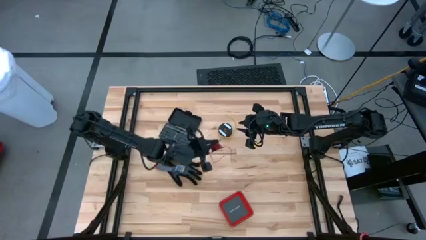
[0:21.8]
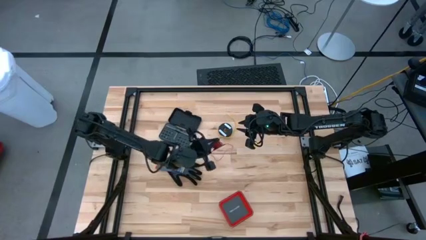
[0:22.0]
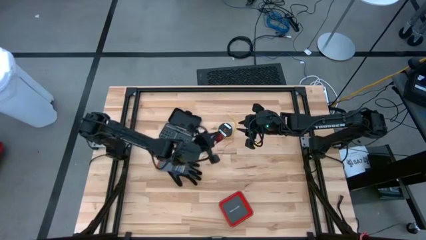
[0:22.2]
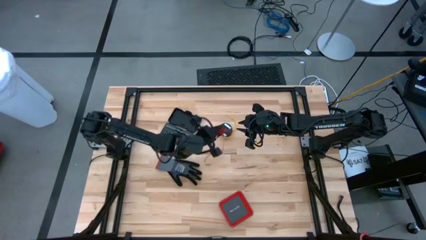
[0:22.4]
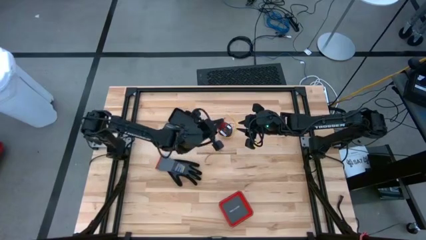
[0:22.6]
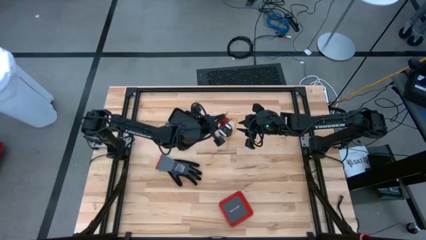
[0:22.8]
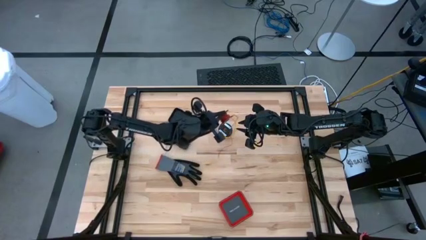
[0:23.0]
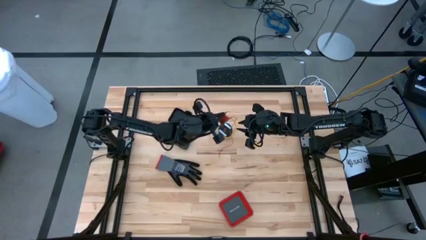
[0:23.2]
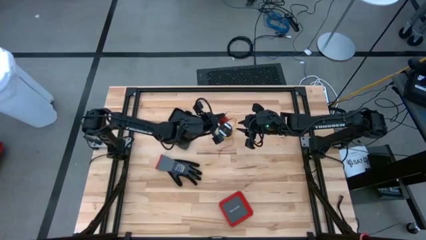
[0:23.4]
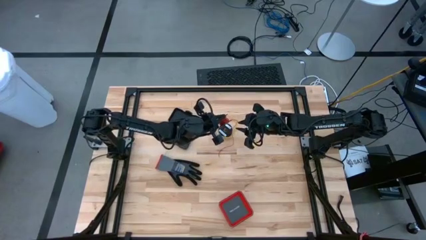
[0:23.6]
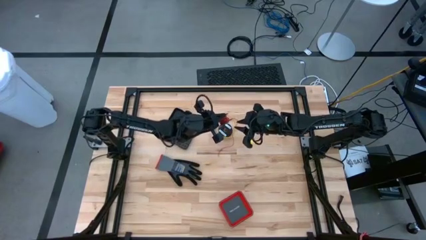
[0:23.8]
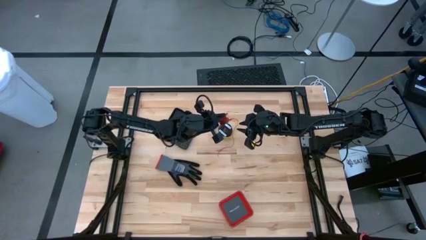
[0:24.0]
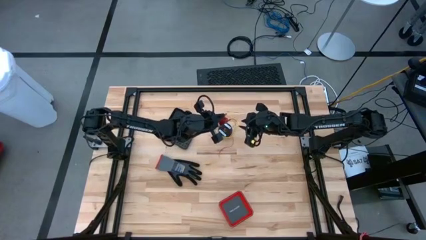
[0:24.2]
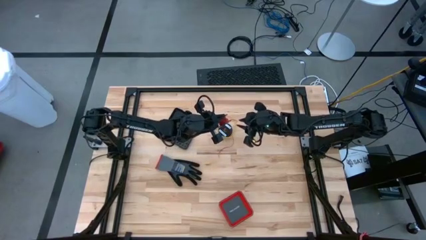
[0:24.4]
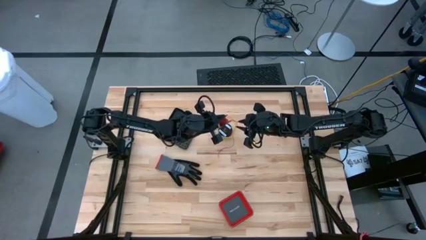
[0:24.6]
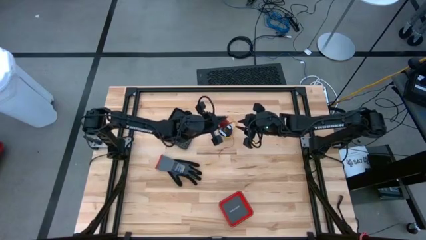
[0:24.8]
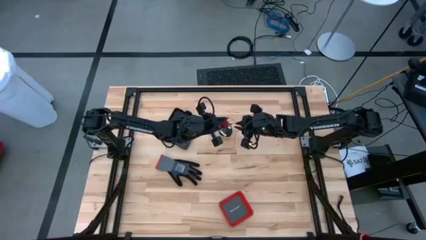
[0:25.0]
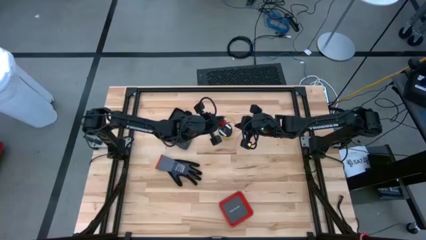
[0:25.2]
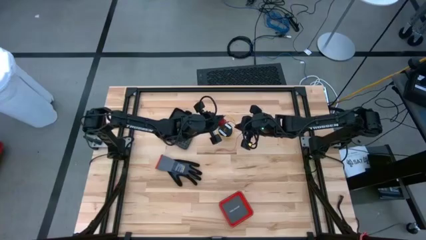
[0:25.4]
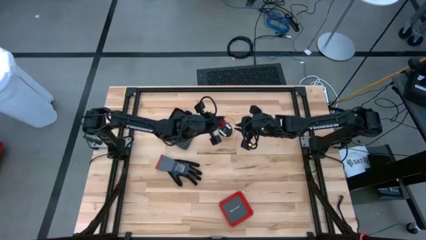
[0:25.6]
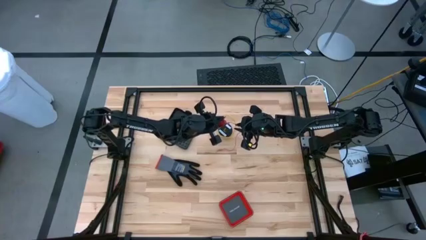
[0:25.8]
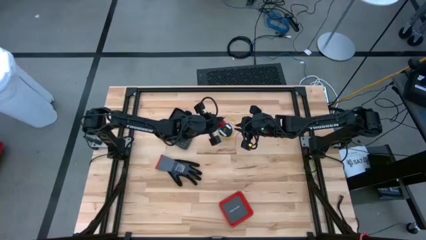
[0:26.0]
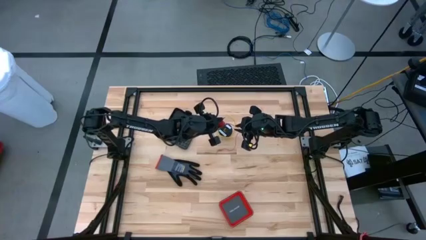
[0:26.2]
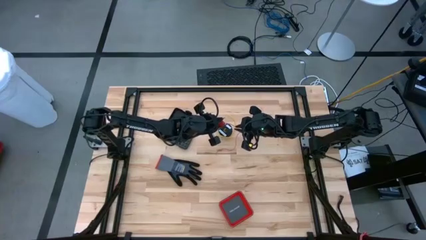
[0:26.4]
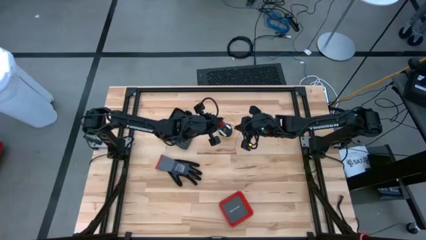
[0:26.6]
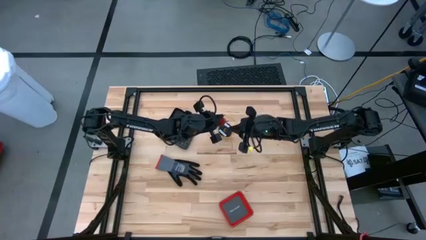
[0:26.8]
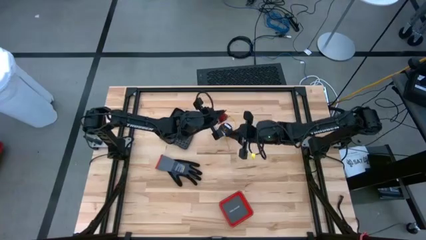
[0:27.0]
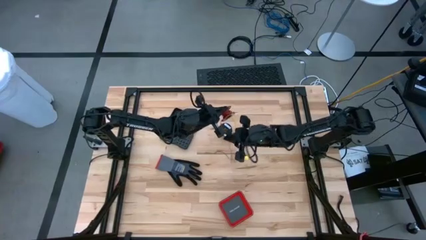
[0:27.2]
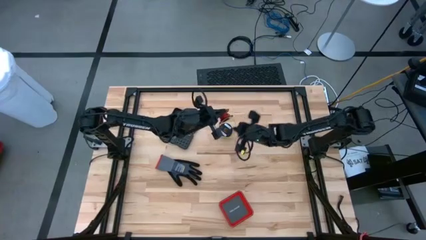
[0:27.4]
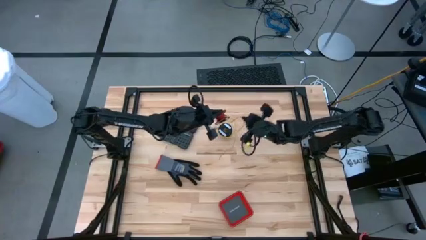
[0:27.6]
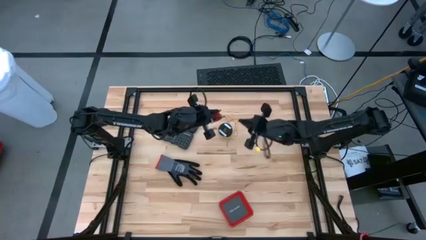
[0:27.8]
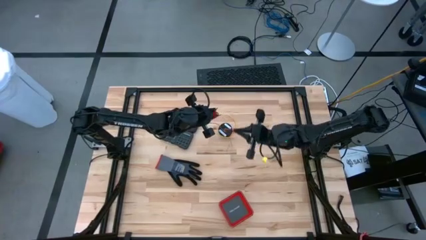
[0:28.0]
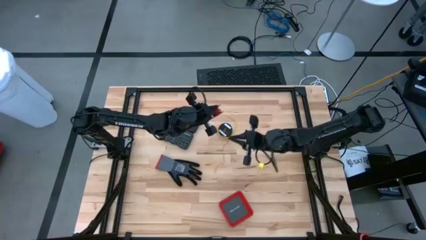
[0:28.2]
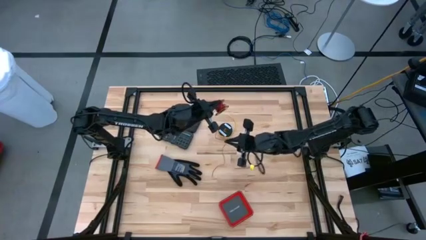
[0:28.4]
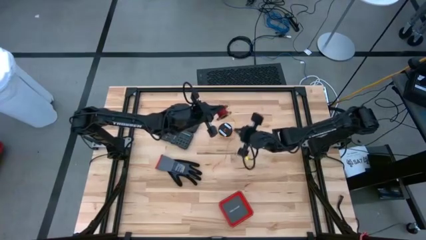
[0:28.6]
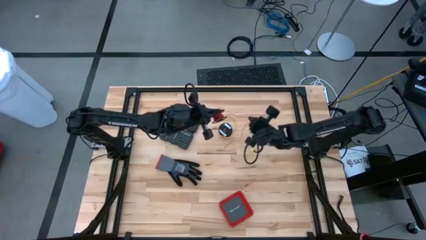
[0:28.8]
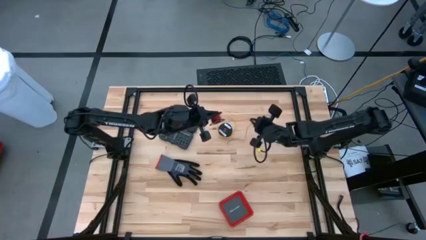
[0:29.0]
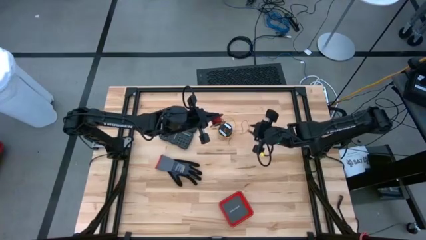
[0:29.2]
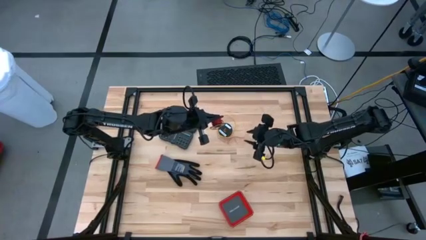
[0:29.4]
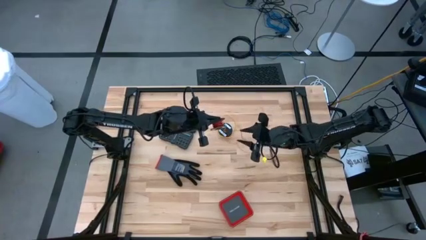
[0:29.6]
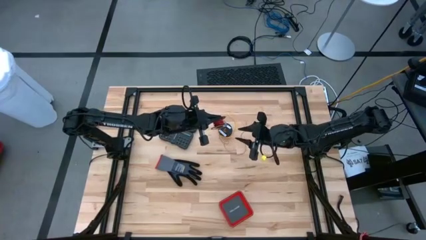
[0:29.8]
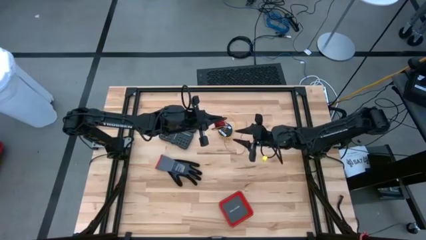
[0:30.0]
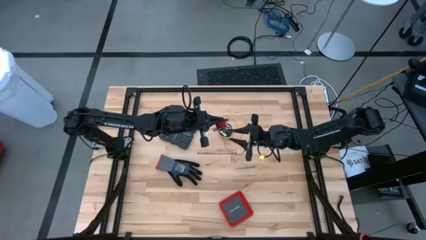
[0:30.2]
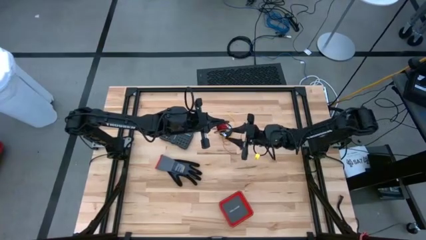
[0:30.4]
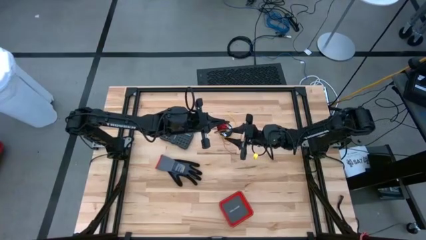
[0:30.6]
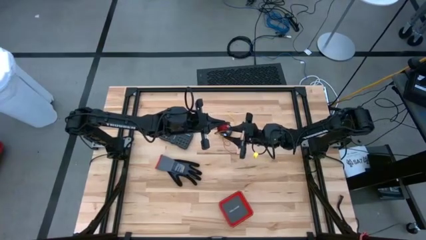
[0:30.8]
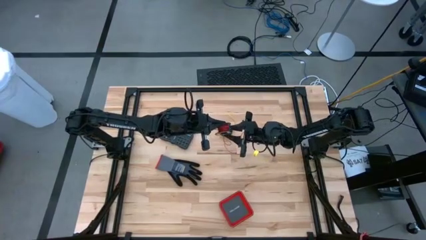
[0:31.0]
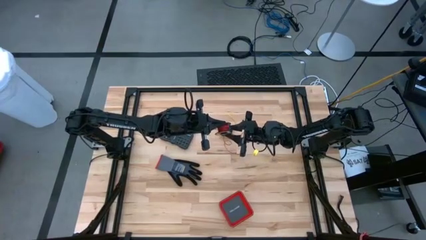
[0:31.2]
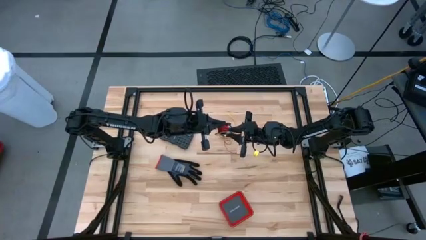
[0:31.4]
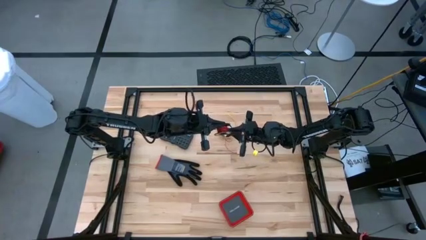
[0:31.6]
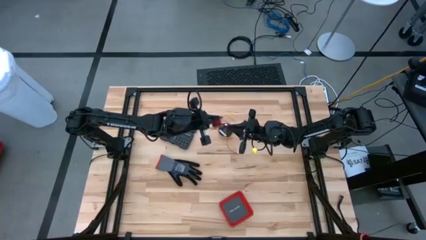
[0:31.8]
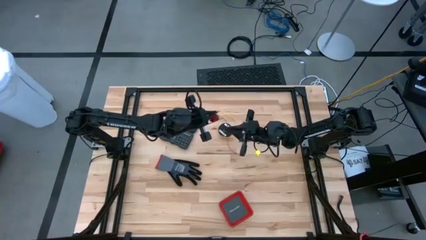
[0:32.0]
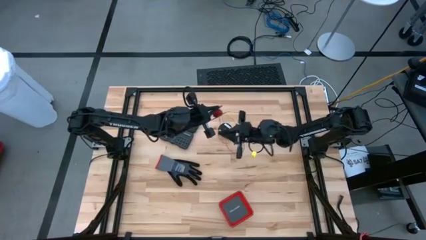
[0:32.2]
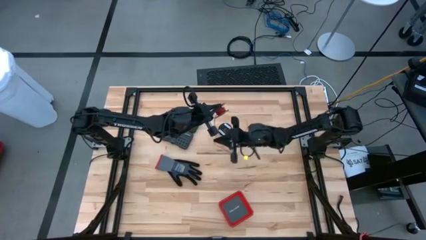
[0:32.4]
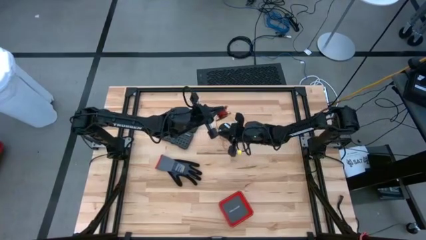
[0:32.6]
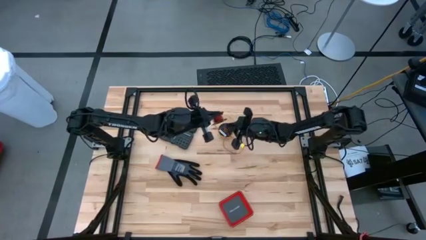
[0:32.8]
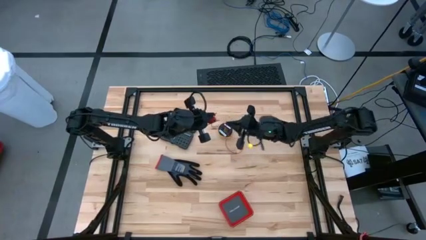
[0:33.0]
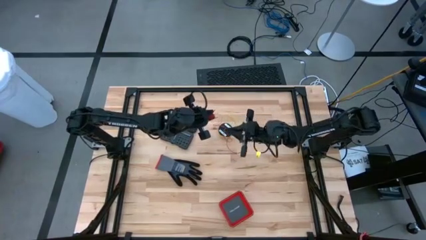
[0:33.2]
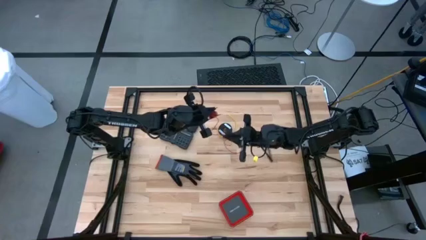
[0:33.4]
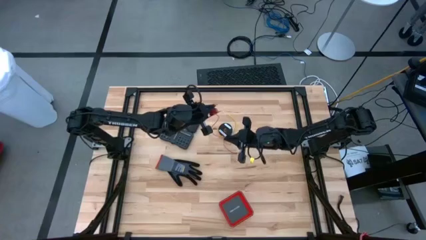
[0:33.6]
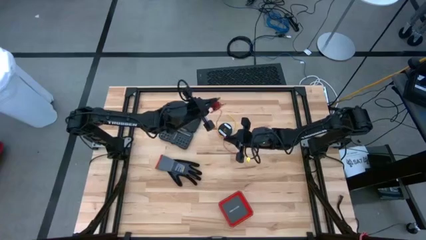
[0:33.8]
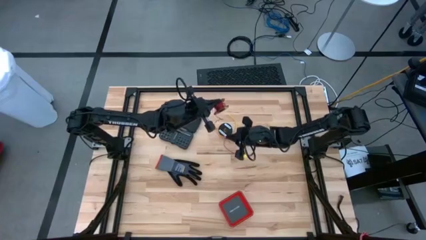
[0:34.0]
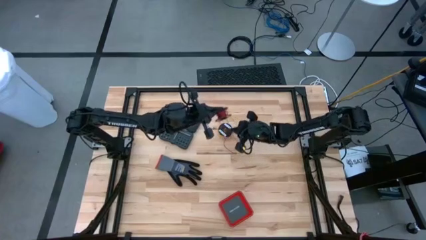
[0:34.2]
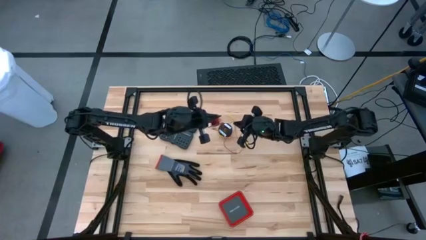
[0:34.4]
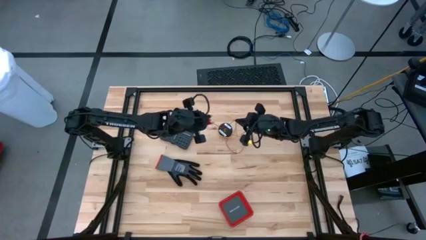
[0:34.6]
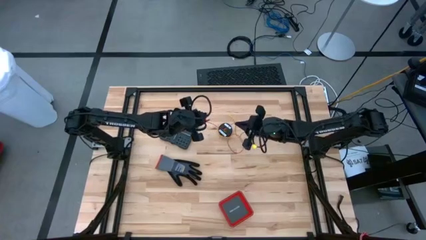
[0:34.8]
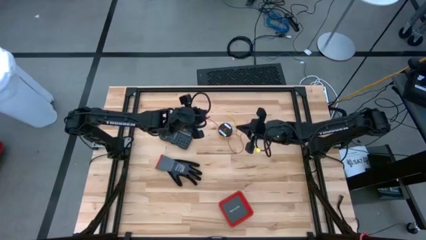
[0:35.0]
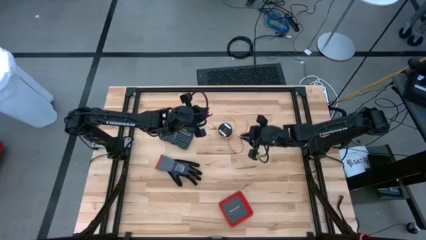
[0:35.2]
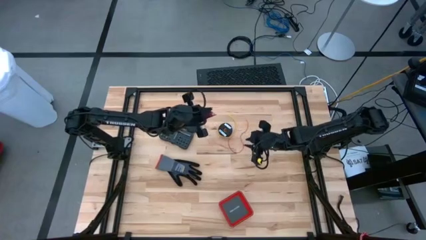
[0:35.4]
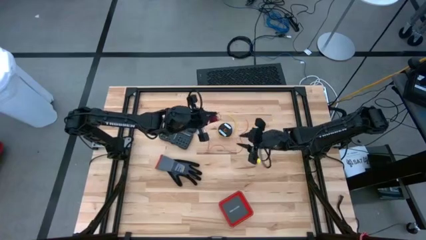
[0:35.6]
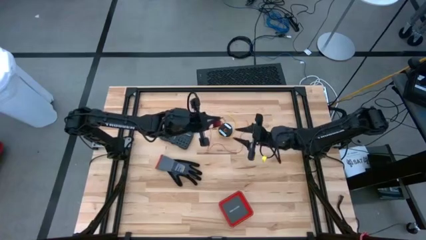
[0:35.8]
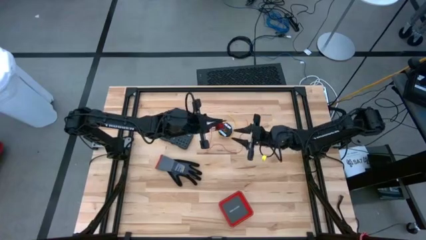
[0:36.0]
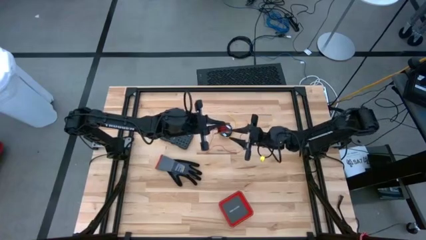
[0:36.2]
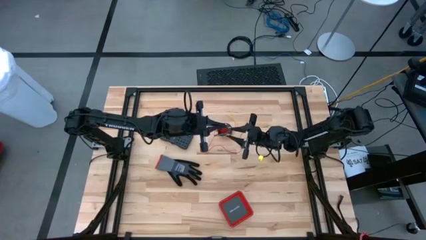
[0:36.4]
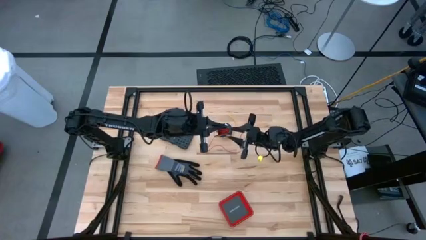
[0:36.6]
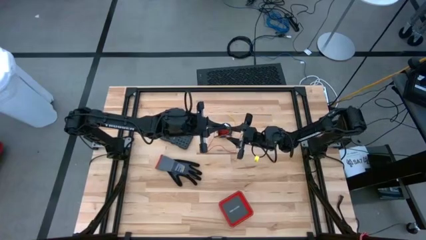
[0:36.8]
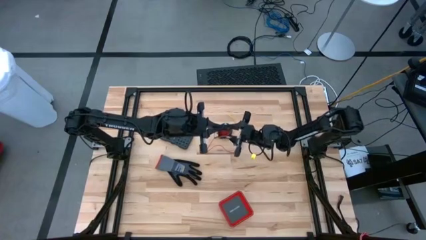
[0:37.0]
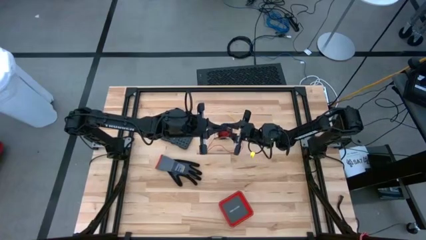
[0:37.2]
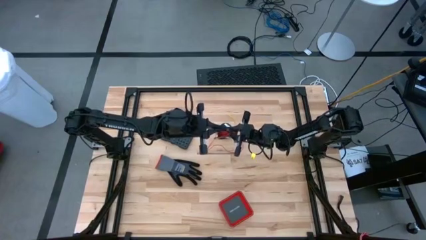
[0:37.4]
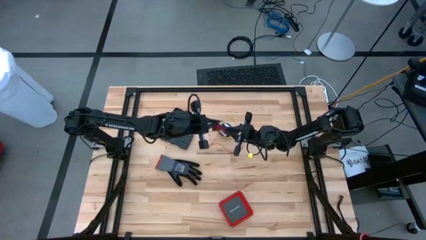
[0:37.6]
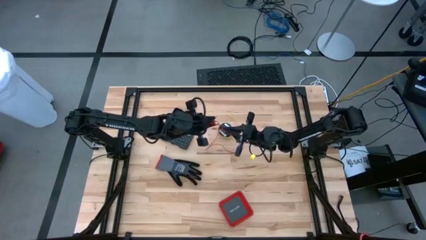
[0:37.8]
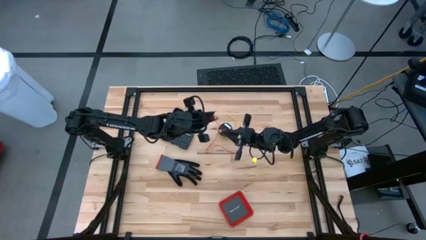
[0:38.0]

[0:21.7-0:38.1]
Task: Coil cords
Uncoil the red wire from the spool
